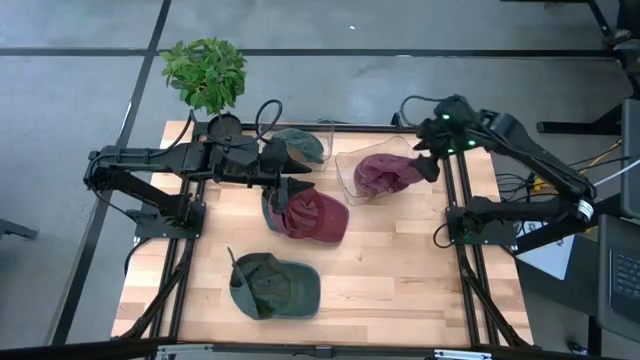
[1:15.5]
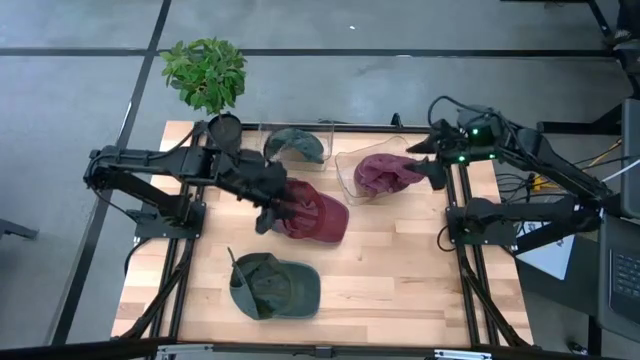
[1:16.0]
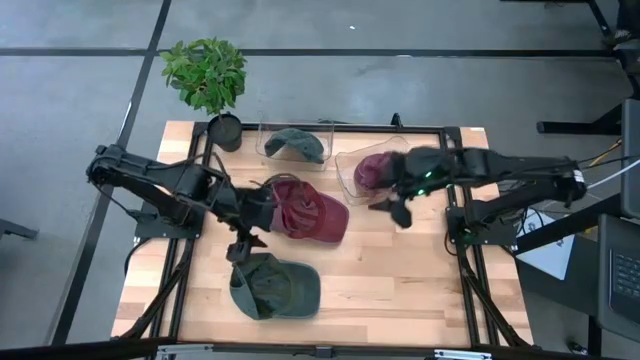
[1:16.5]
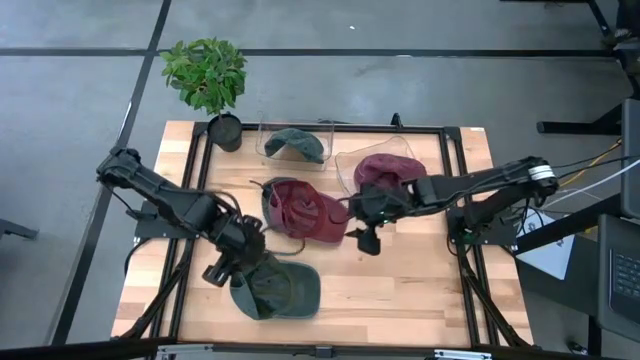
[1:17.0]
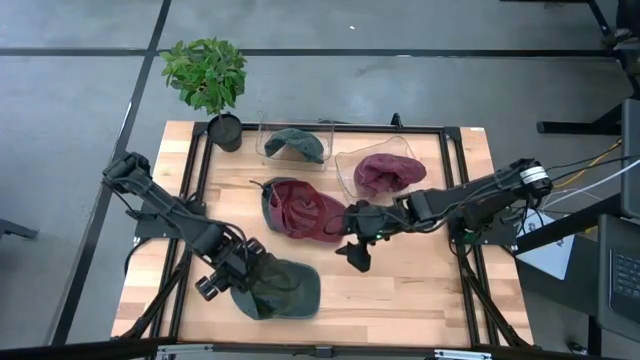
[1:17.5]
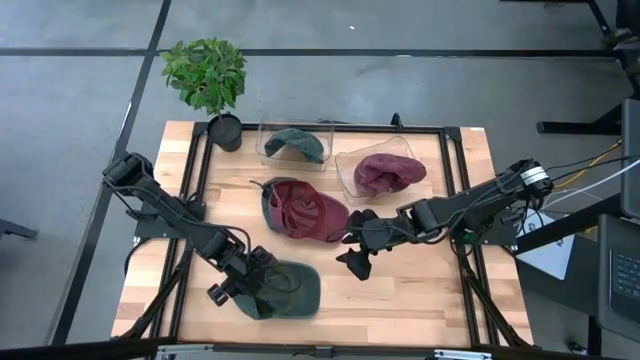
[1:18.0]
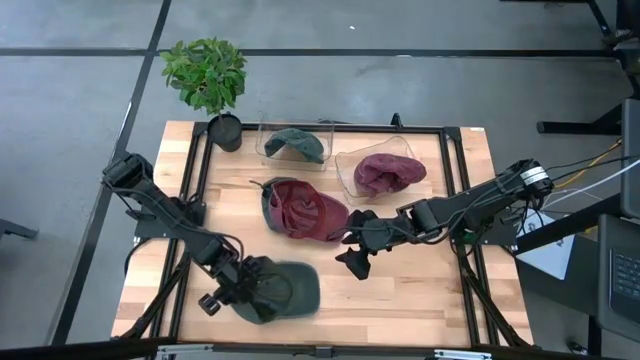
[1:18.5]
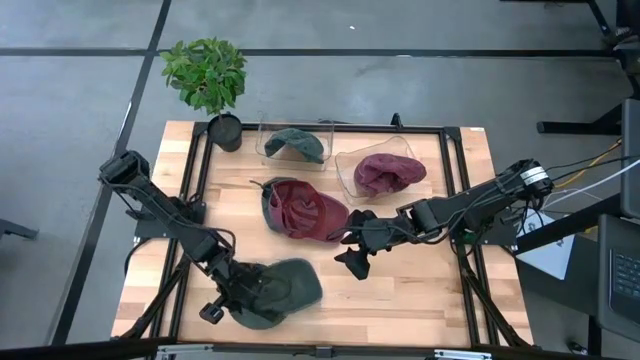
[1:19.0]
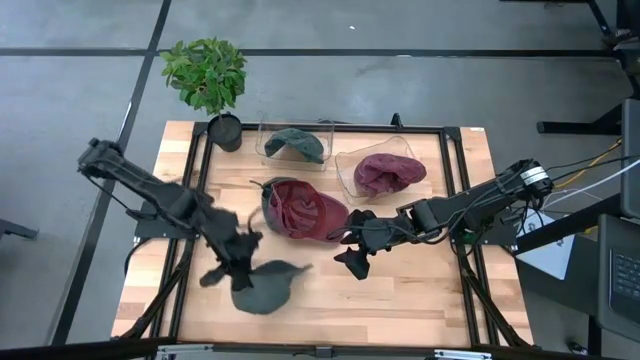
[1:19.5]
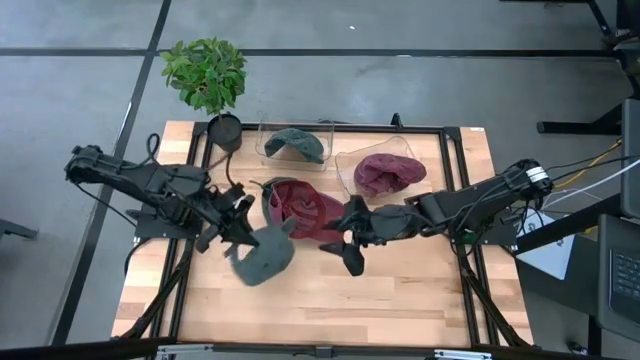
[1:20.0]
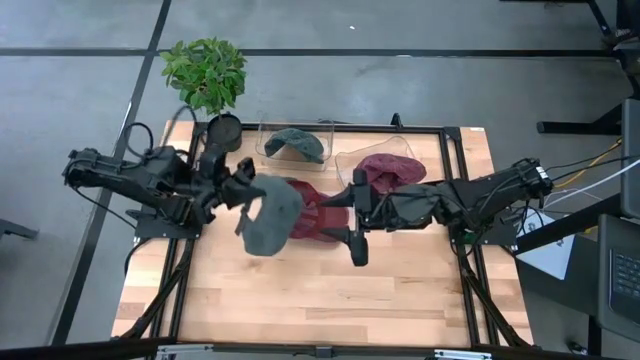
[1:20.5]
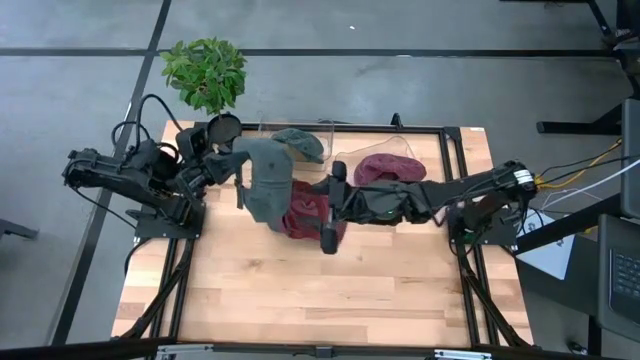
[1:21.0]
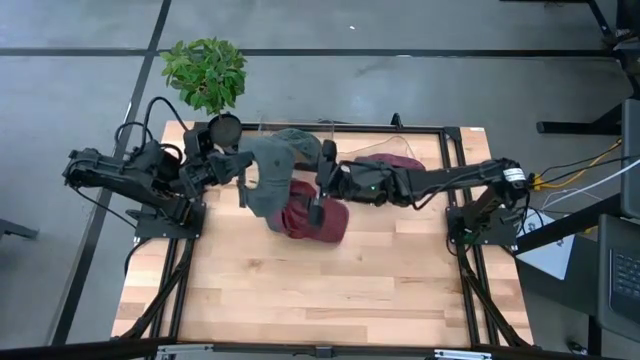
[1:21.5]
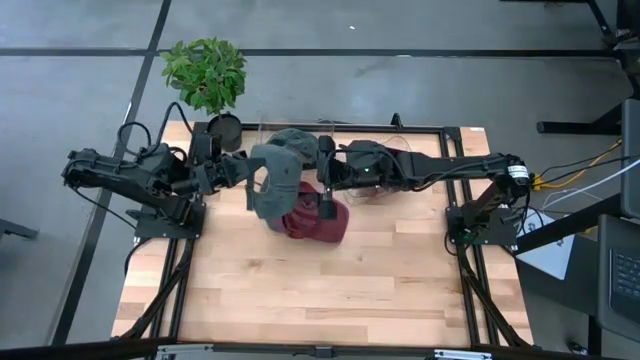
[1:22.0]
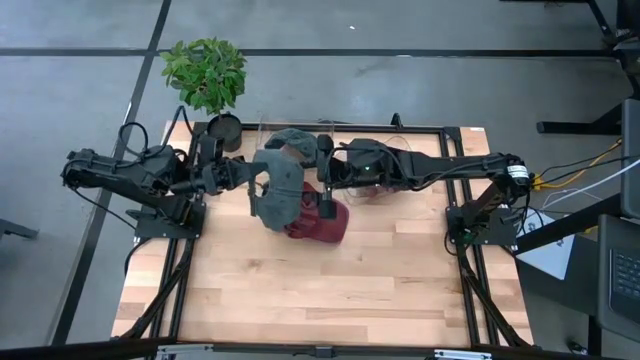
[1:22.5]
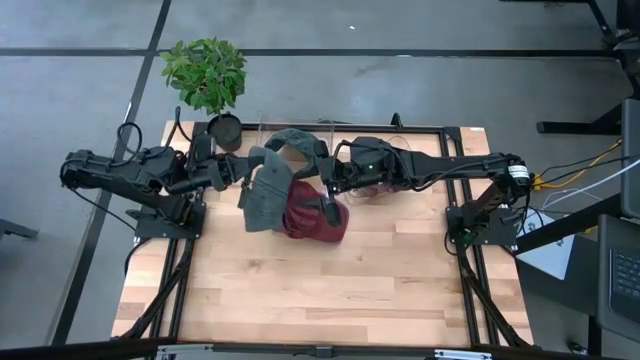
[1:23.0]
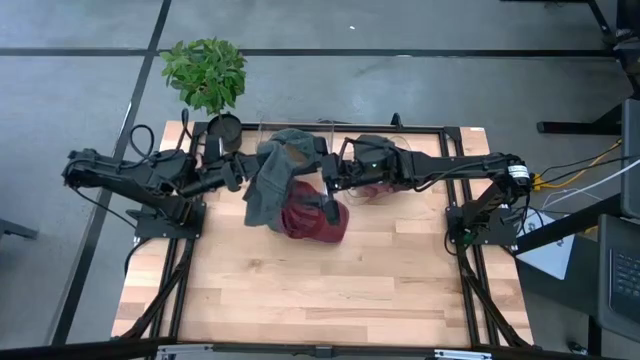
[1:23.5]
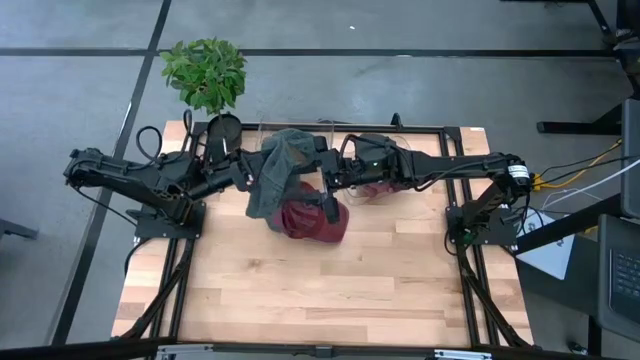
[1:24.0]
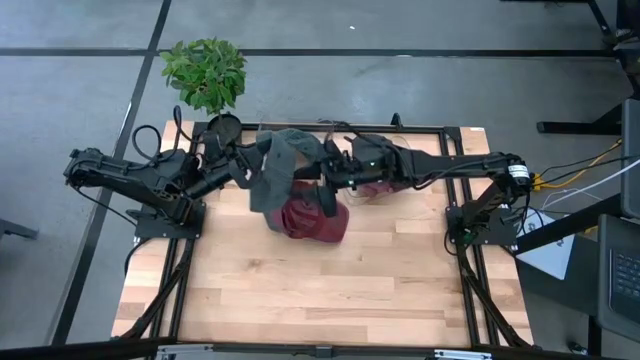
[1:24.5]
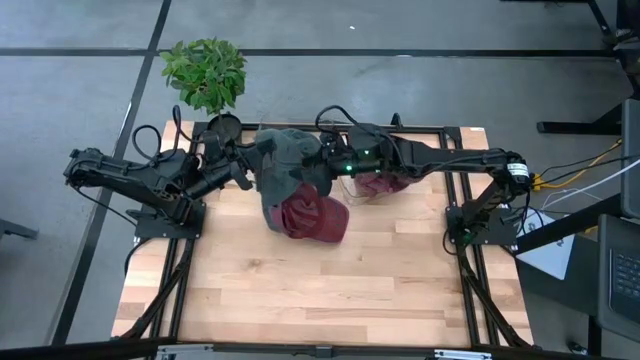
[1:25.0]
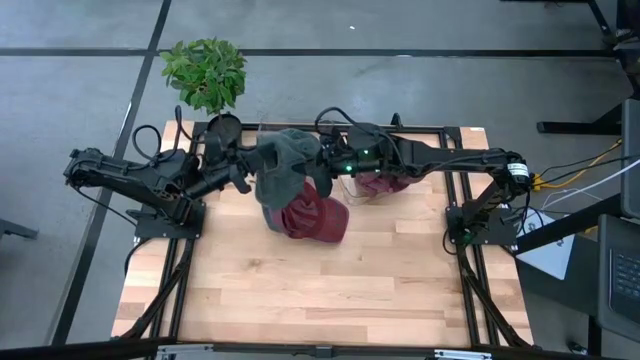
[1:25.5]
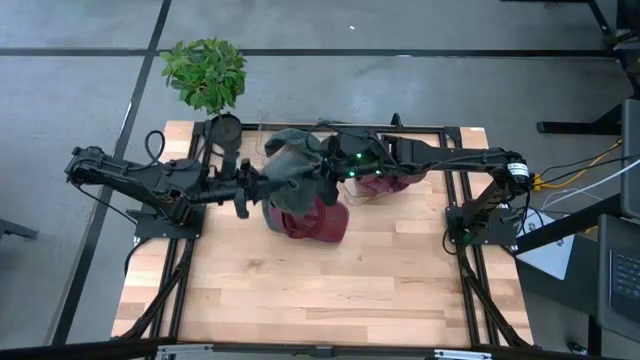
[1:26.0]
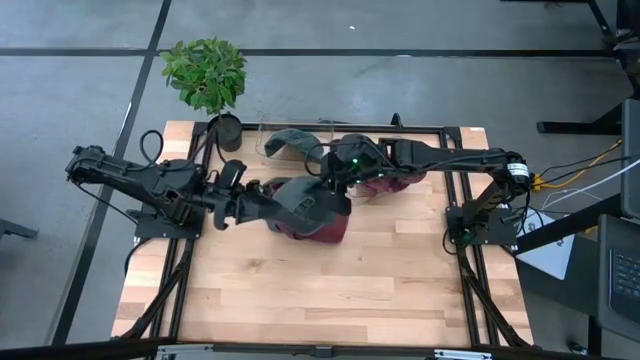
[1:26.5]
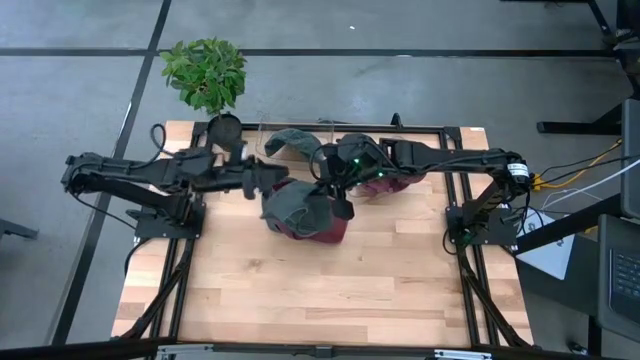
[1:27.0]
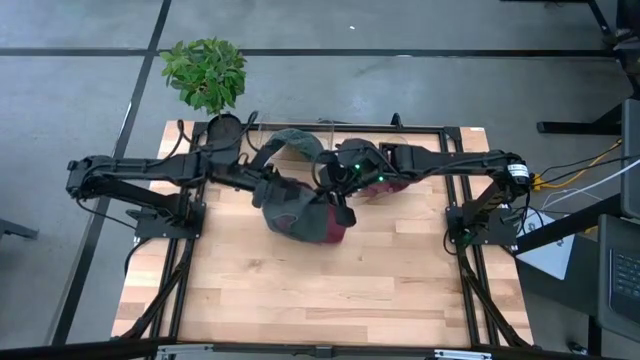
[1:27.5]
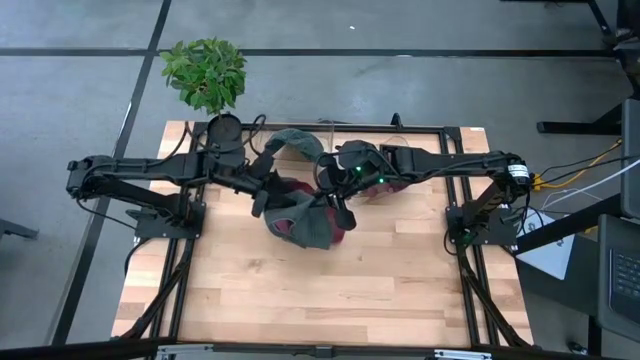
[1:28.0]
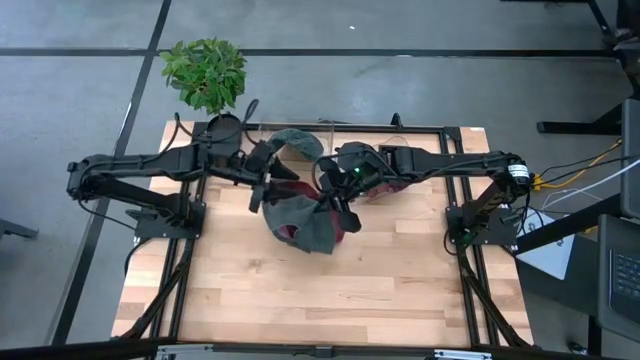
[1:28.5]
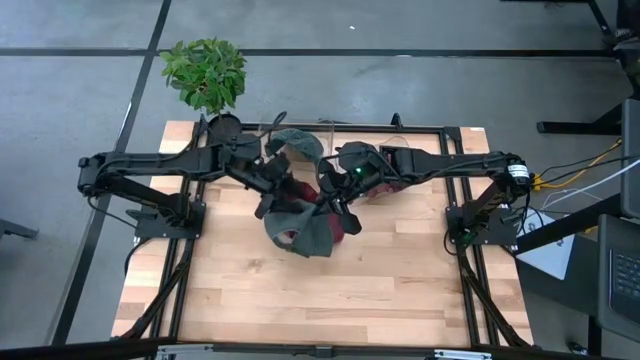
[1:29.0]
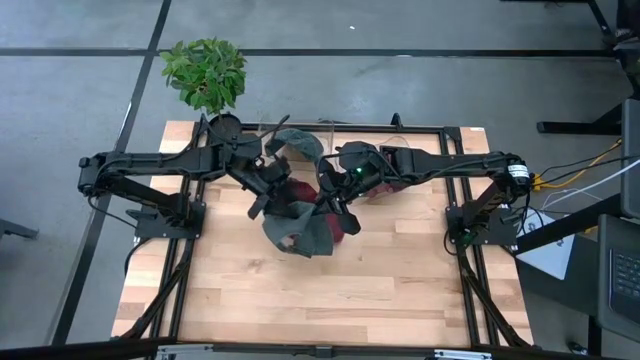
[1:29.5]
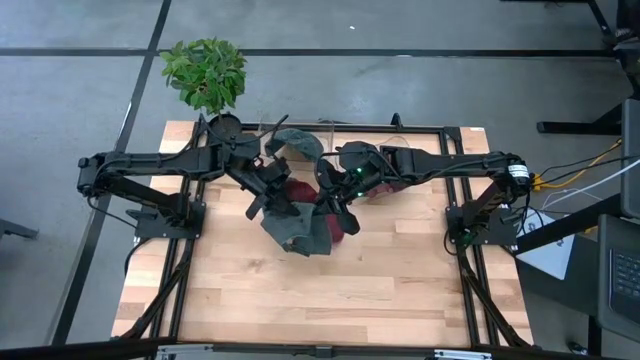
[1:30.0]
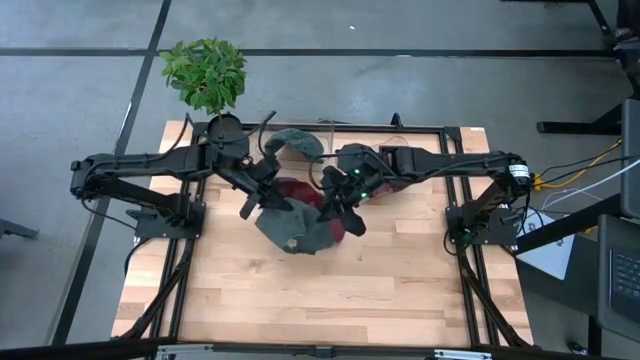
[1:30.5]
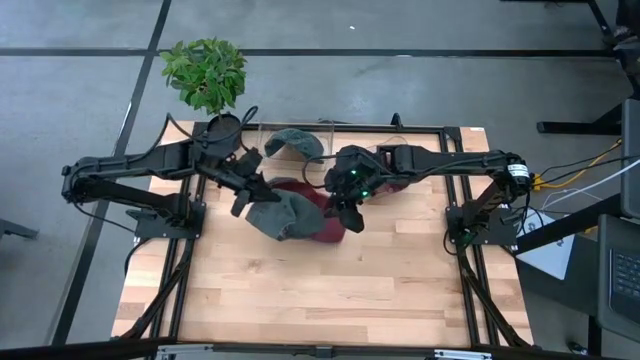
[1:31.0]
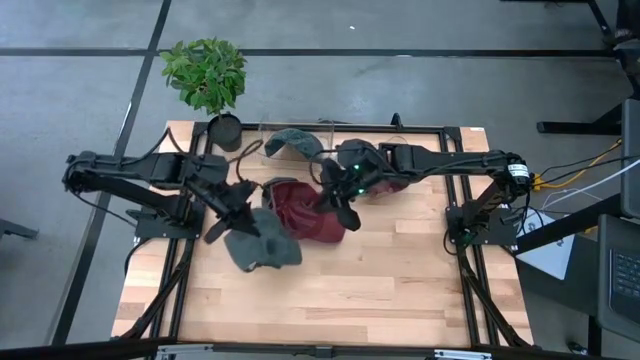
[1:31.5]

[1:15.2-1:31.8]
Task: Pick & Place hat
Put the bottom black cap into the left transparent bin

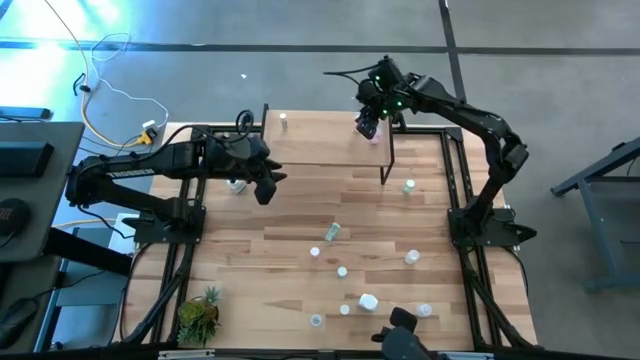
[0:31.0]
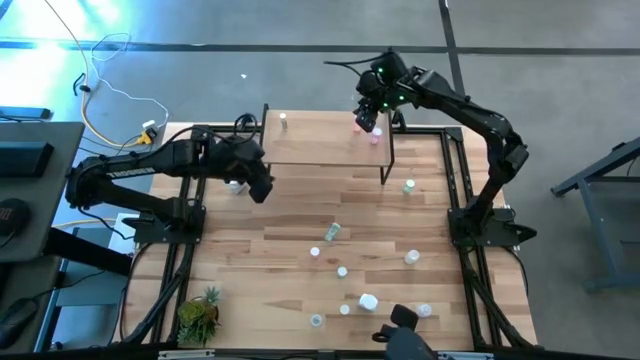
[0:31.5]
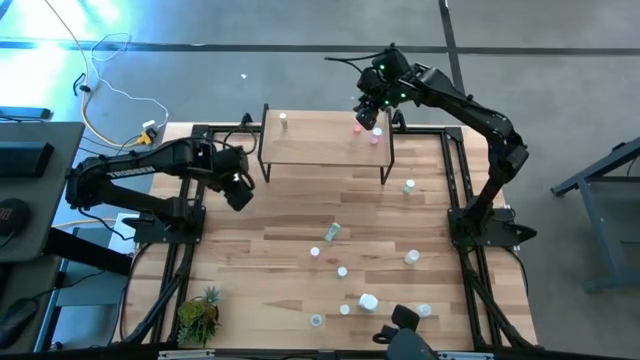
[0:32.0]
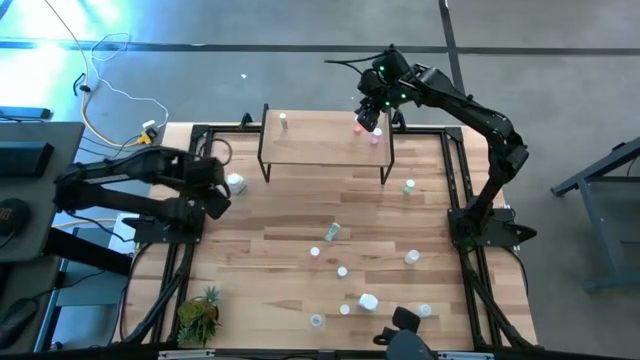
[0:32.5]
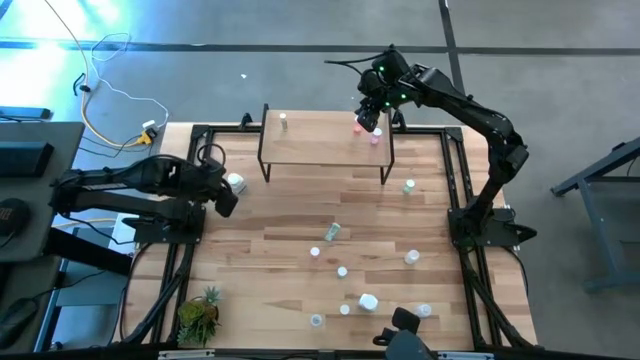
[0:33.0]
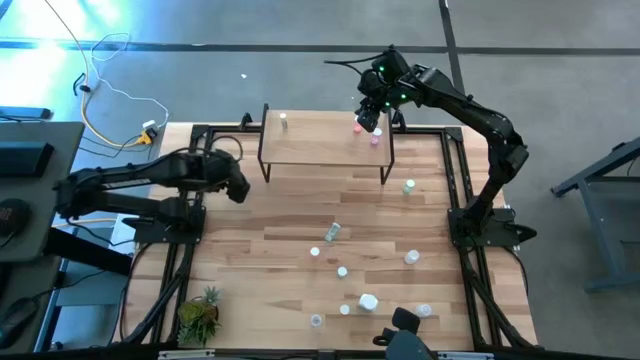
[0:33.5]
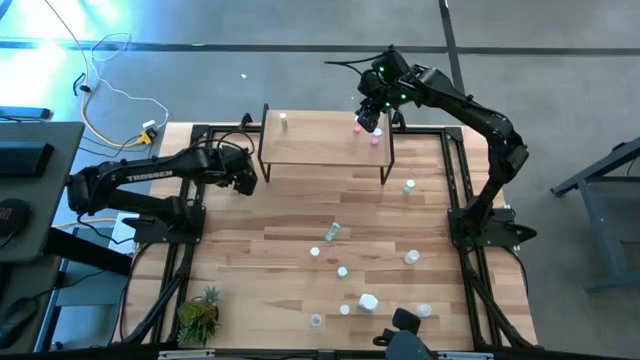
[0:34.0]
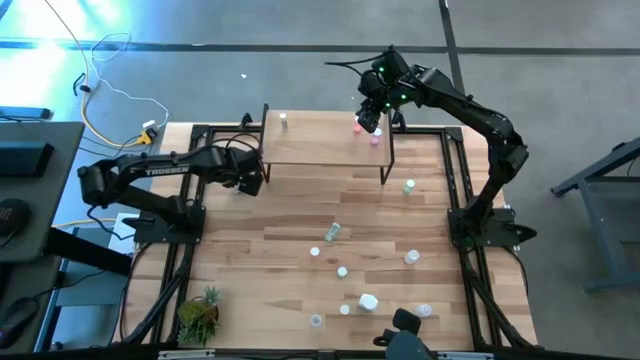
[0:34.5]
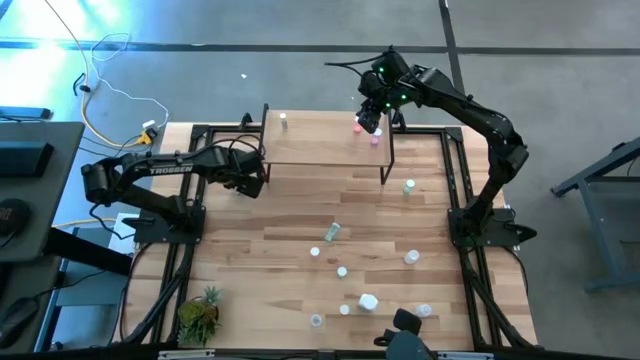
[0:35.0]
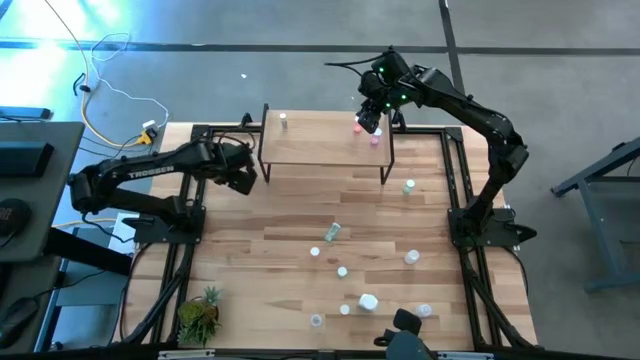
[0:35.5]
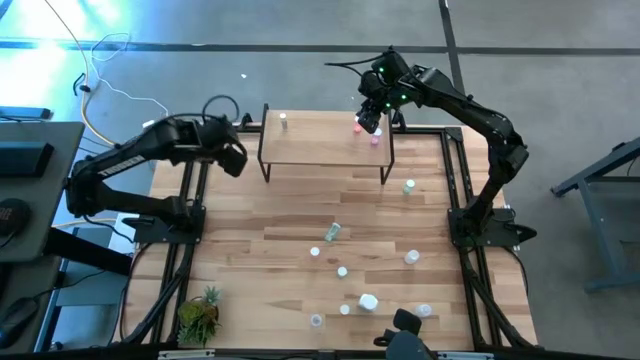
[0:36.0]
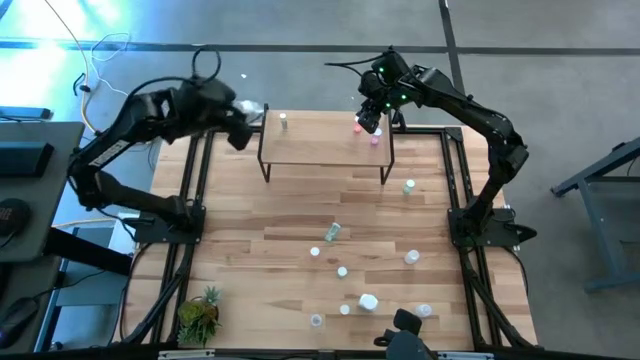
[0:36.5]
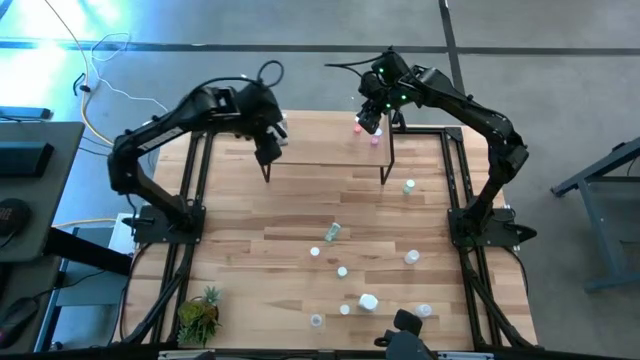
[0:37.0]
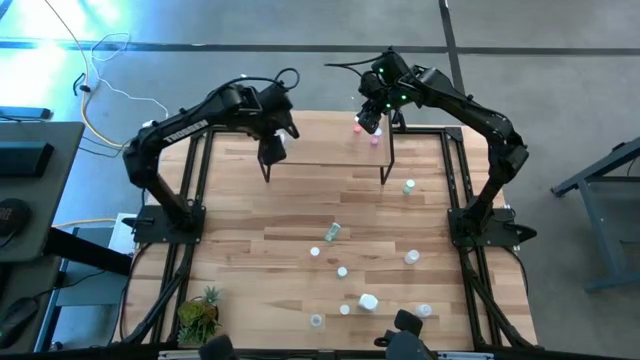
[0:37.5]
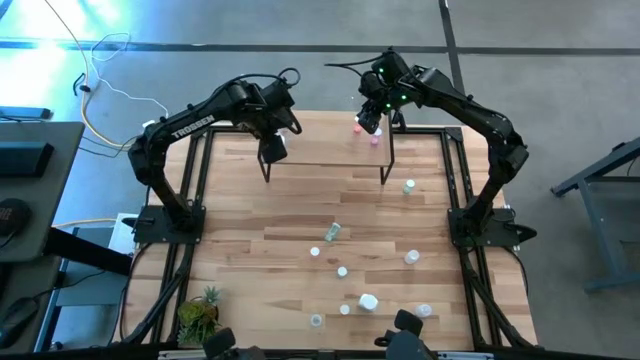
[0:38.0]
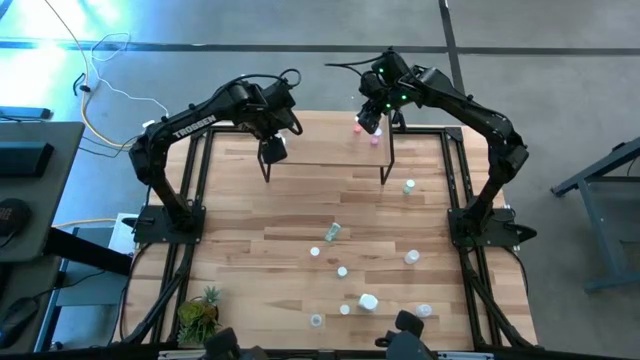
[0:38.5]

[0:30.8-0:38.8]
Task: Pick and place medicine bottles onto shelf by color
Put the top white pill bottle on the shelf
